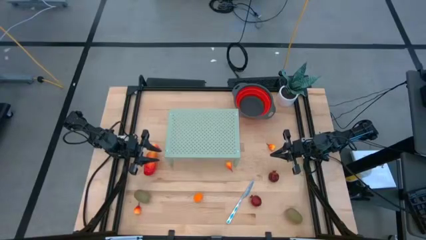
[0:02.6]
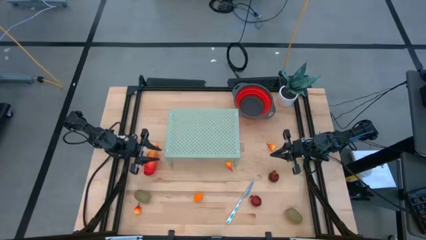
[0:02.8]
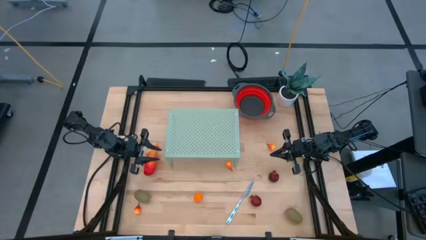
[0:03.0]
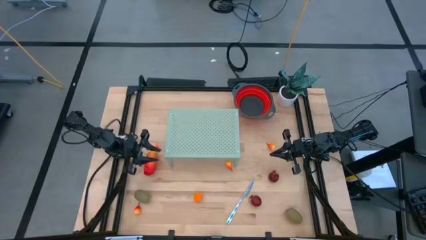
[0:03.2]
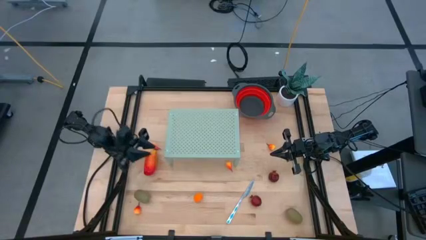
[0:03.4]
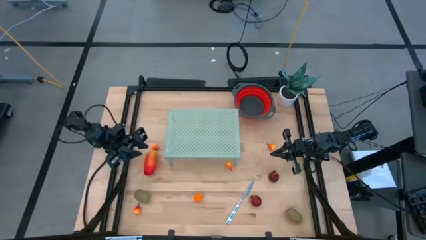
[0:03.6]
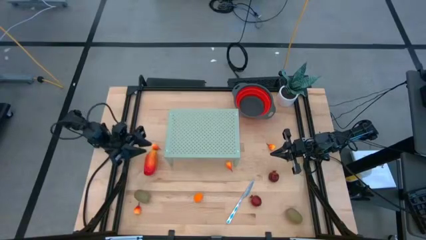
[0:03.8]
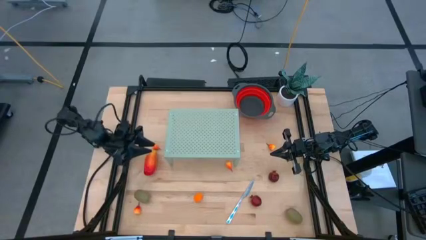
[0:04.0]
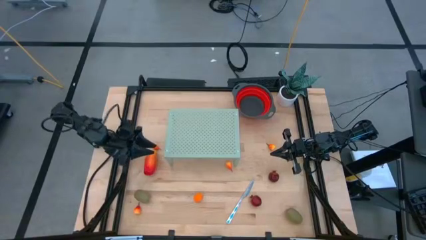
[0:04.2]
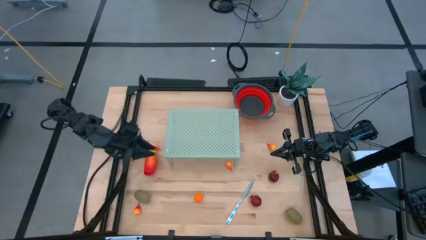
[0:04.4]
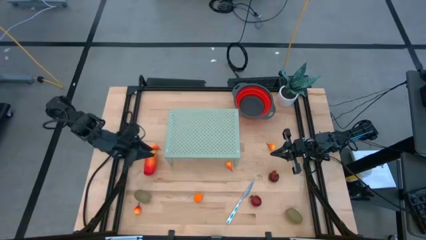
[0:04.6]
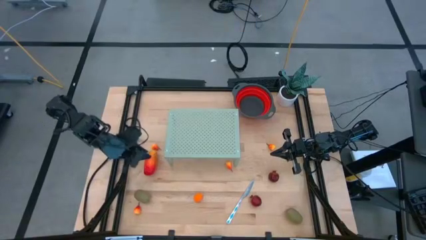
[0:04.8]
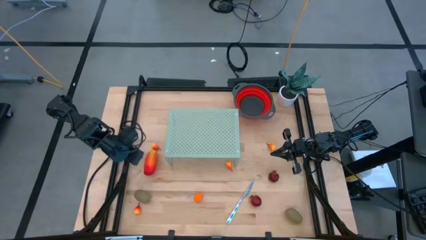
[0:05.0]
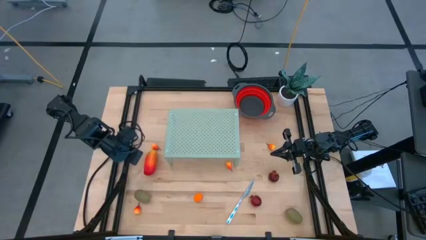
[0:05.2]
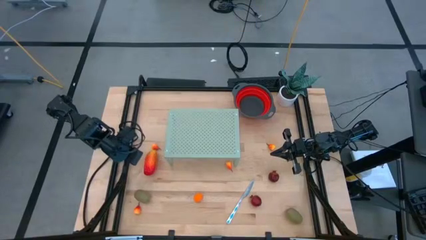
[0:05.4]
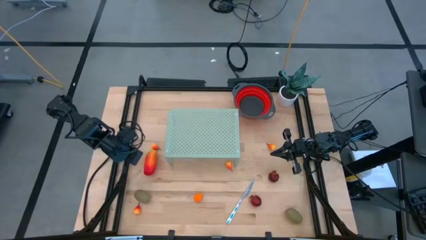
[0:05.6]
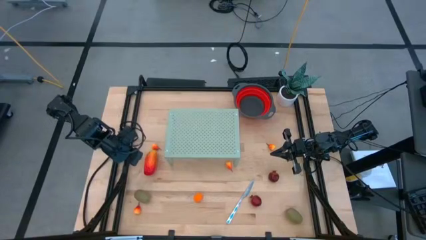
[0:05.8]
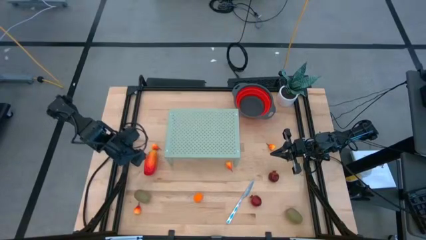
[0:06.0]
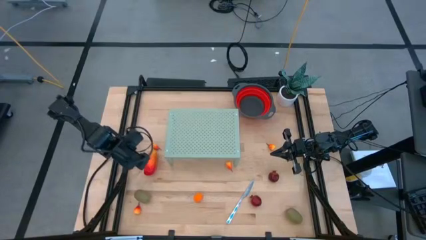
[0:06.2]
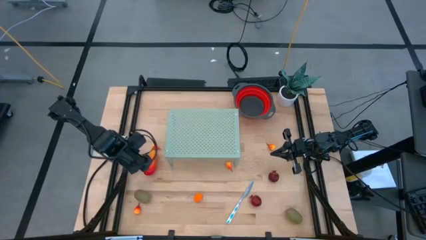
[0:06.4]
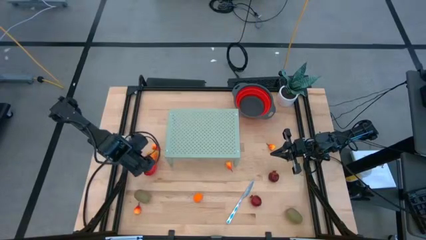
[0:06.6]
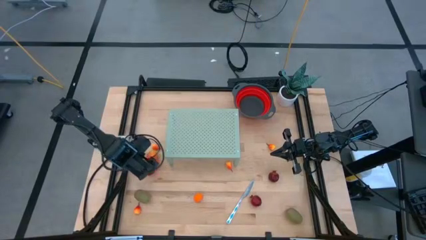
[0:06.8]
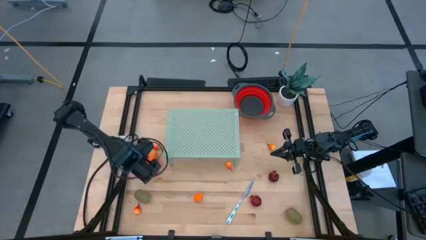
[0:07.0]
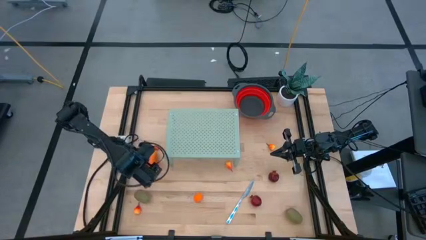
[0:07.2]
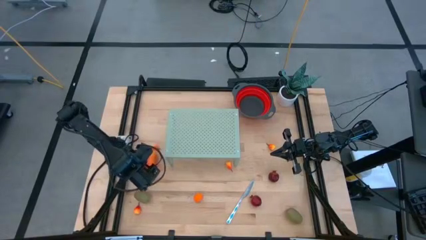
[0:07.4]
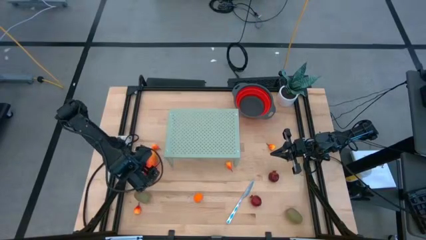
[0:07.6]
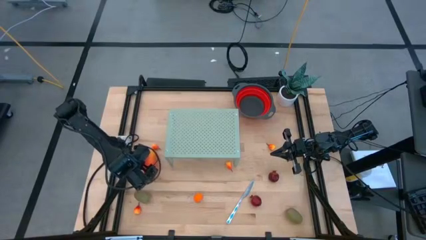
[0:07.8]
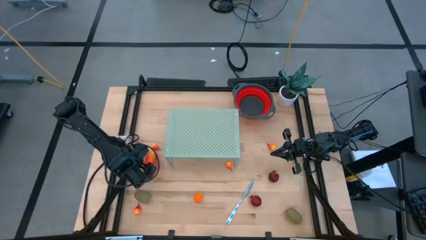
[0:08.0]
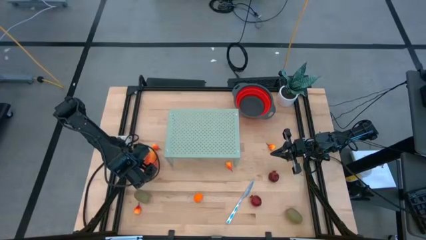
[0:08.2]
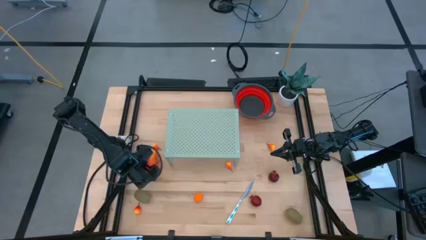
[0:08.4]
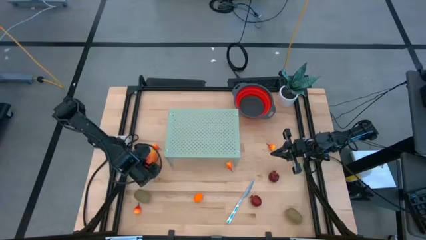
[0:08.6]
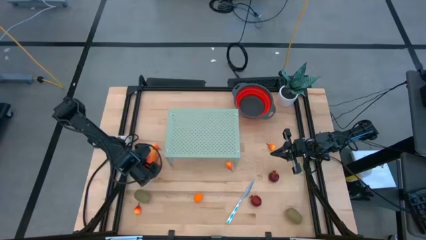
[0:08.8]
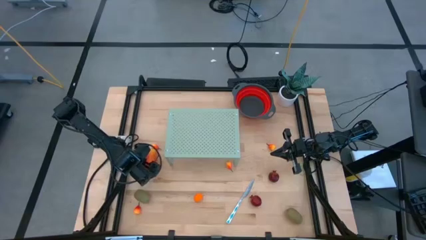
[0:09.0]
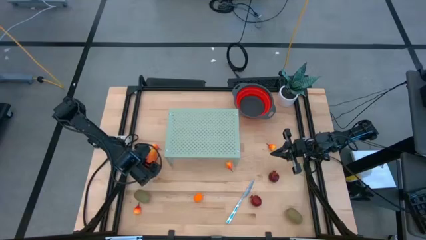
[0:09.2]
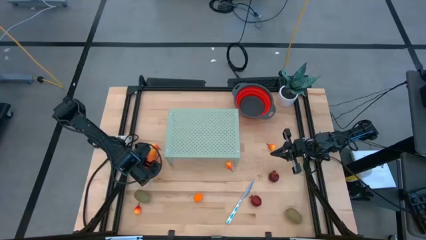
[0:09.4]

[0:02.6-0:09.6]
Task: Pick & Place Fruit
Put the red mango into the red strainer bowl

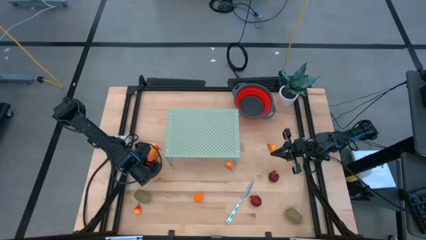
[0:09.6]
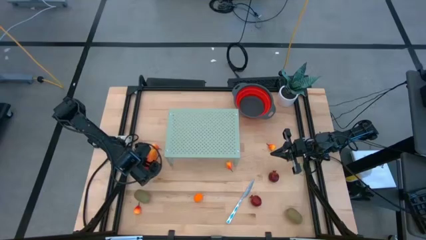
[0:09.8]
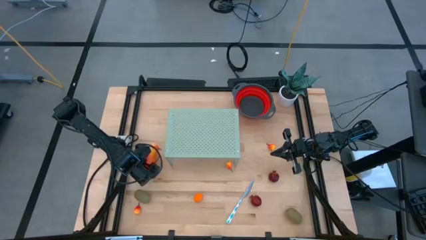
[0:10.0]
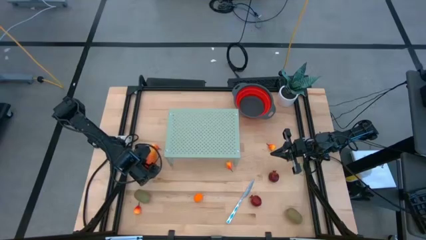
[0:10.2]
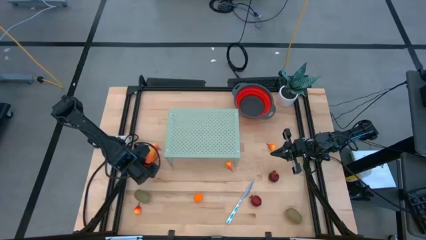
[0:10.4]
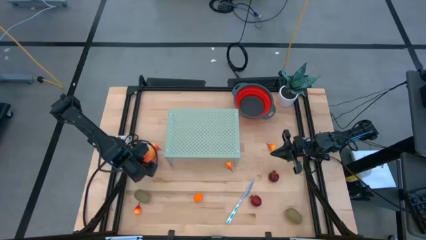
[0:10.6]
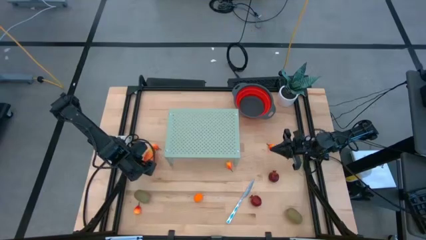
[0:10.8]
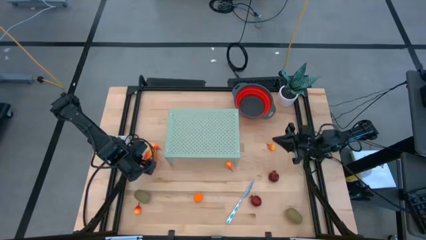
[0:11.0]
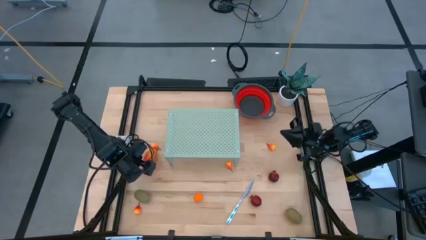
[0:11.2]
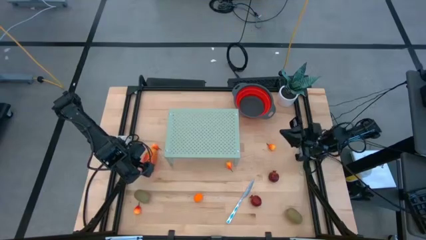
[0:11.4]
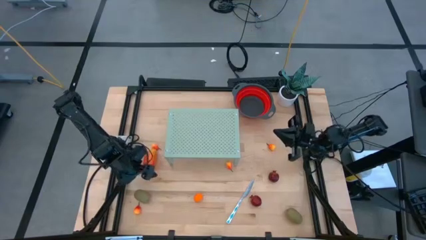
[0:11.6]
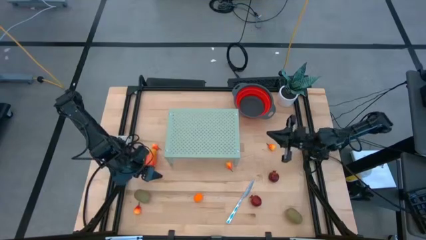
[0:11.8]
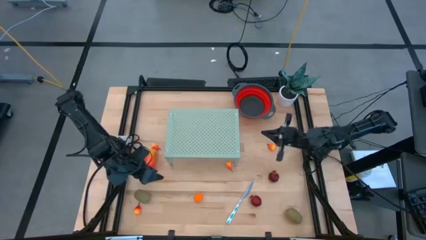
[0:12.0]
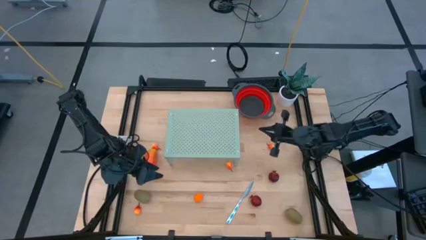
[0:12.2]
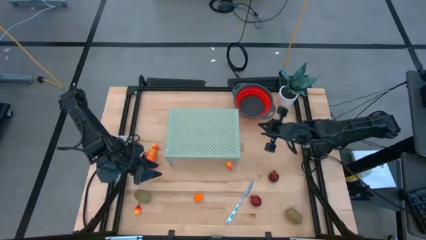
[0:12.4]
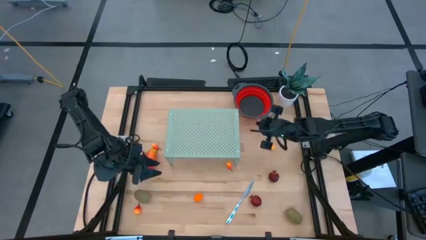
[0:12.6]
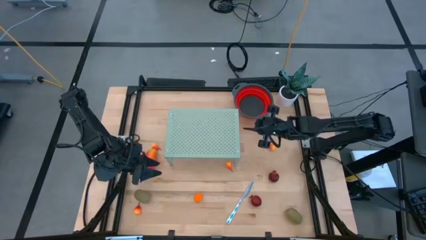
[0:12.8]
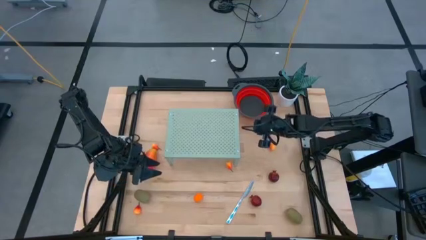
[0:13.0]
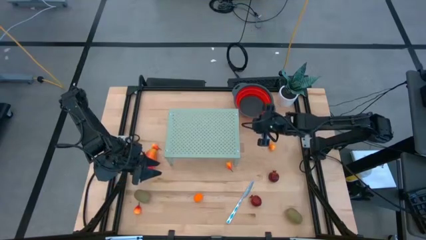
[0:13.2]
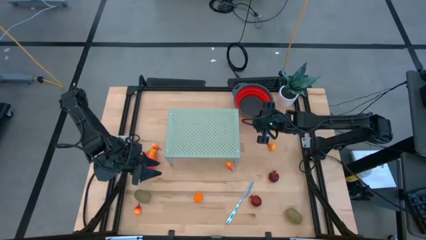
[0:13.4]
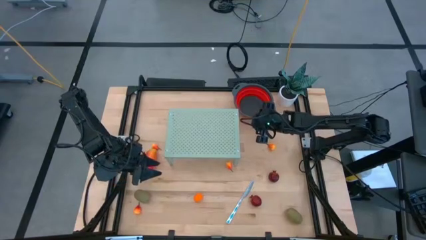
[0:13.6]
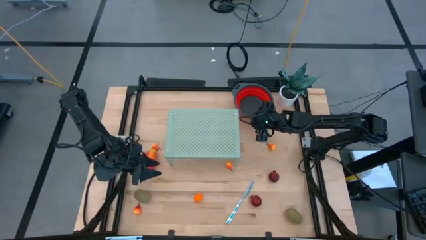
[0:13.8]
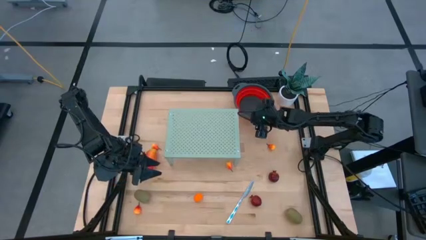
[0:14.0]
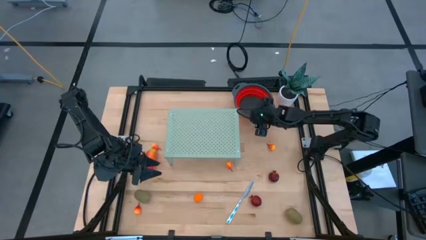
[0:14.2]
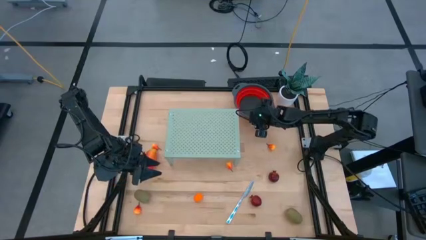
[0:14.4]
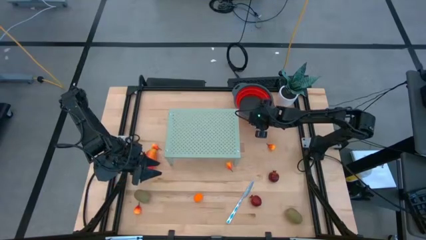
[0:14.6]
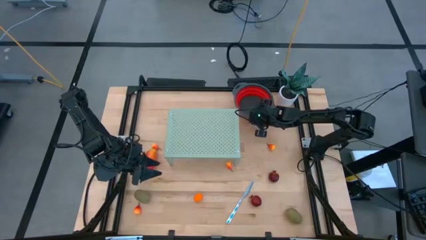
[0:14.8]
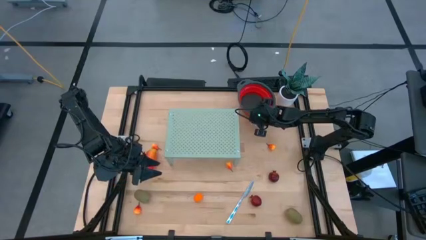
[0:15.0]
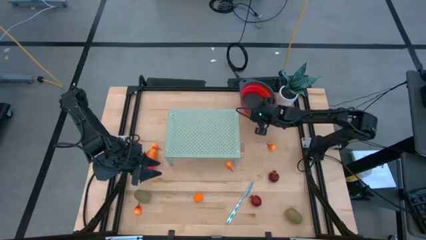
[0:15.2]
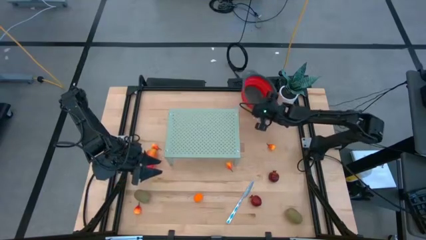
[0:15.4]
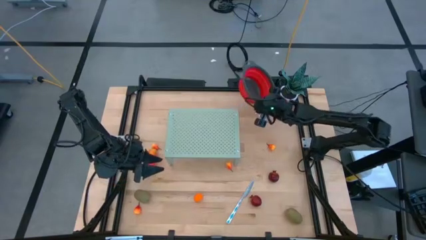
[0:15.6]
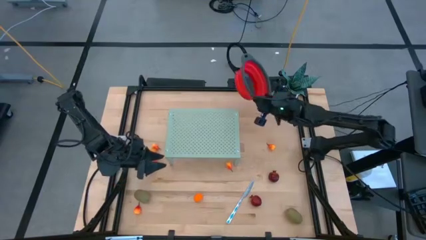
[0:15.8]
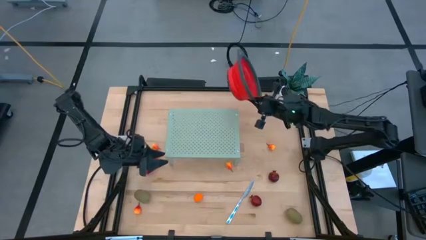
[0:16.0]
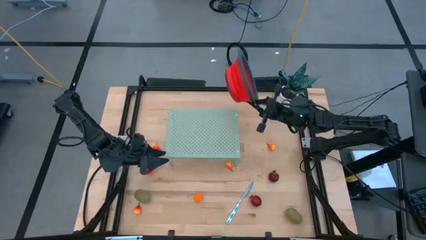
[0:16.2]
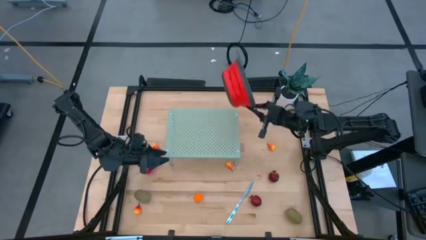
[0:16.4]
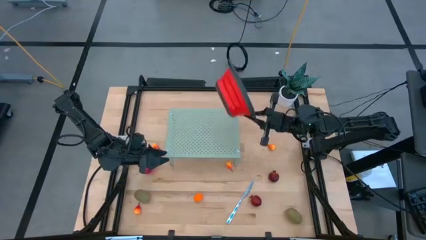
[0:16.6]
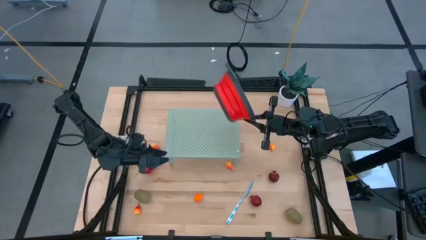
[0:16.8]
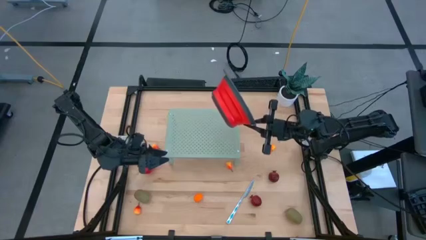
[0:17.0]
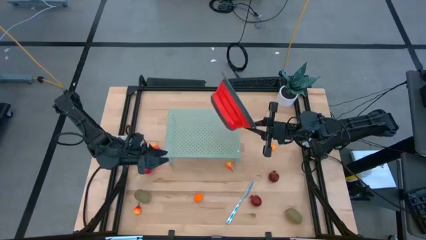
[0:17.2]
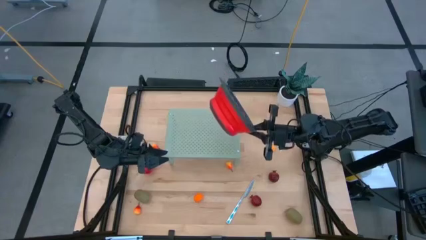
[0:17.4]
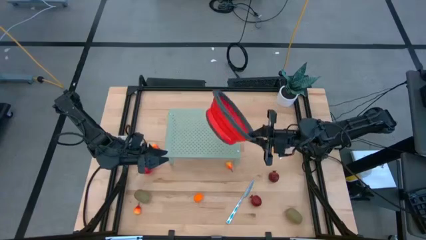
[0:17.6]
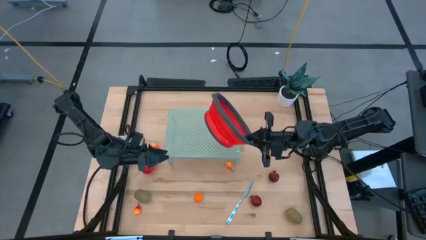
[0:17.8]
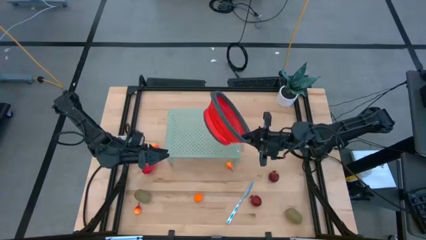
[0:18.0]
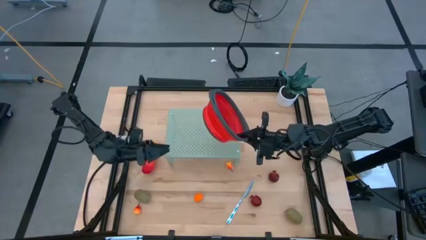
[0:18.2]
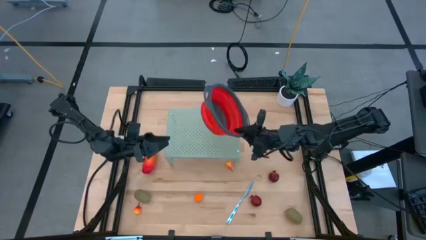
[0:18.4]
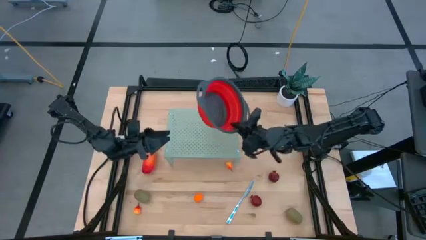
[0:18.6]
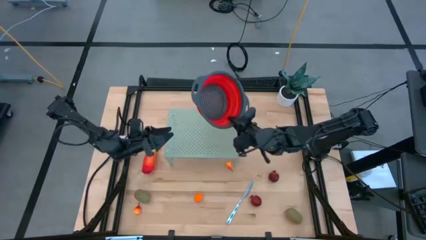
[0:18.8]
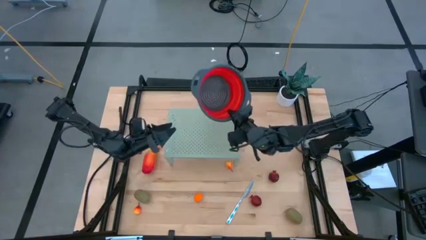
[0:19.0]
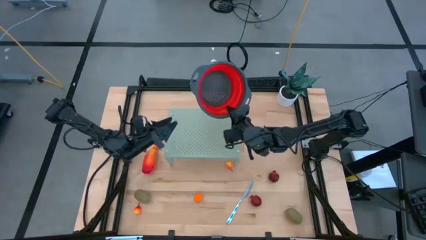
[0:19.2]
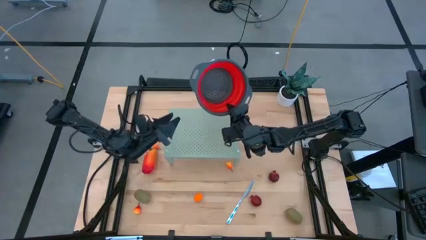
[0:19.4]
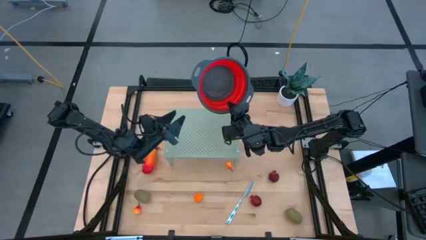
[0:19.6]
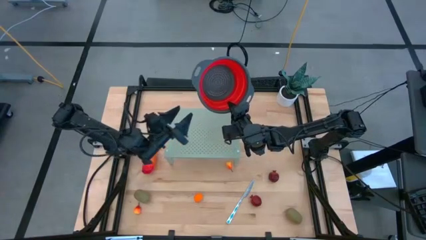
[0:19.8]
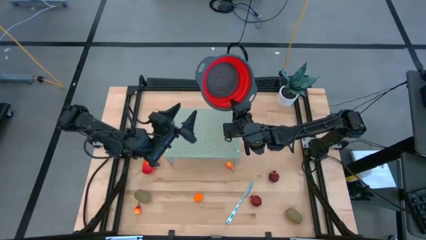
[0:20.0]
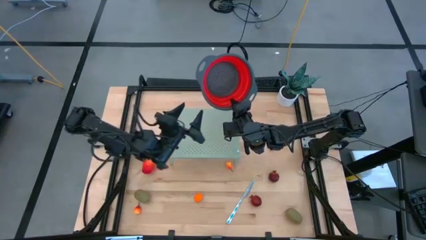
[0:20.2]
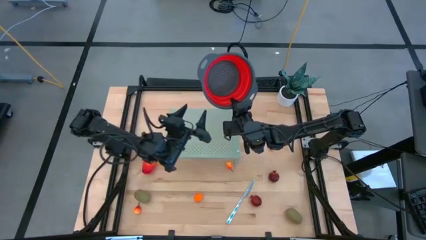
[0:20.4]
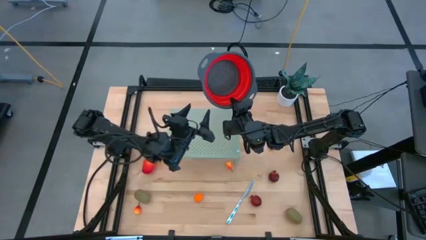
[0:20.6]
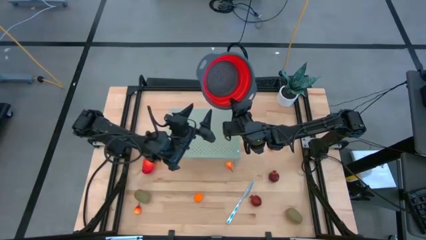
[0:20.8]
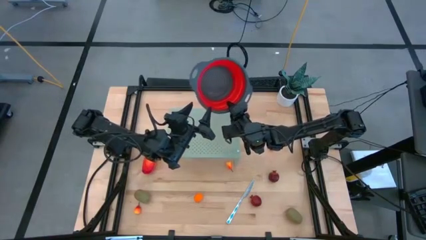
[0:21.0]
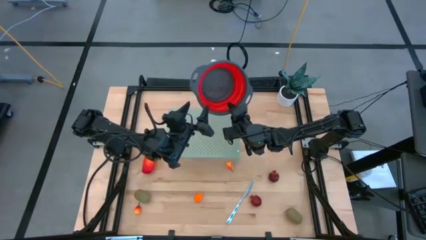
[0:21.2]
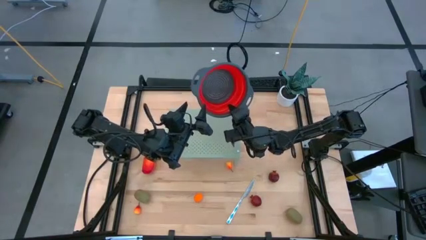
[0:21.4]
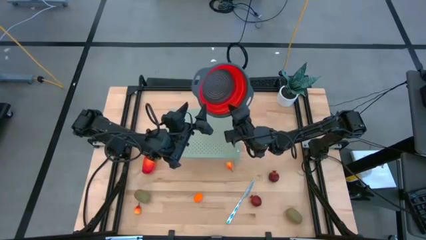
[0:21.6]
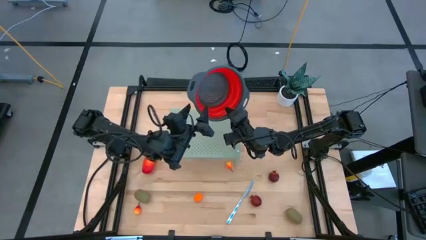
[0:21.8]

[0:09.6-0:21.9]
Put the red strainer bowl on the shelf
